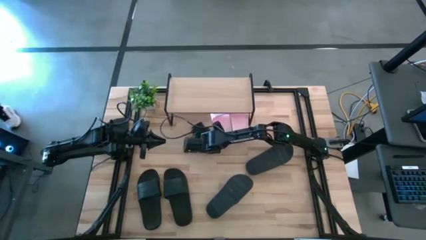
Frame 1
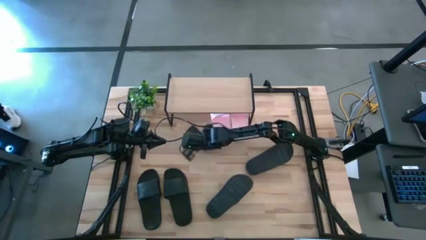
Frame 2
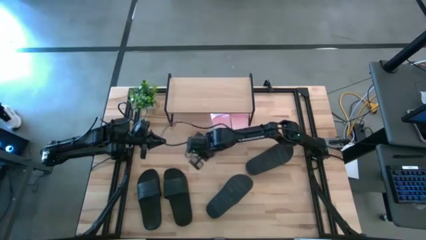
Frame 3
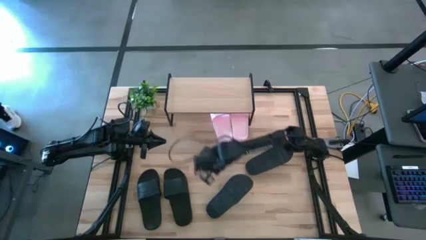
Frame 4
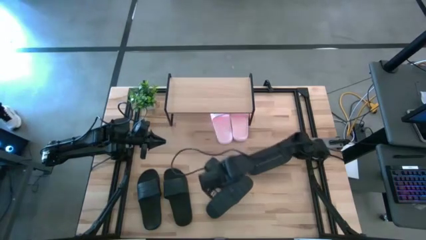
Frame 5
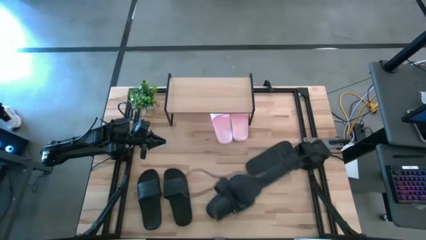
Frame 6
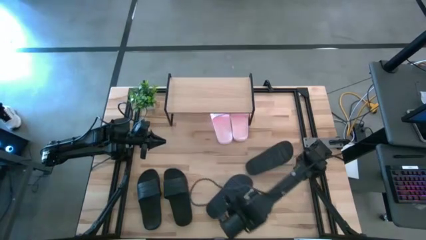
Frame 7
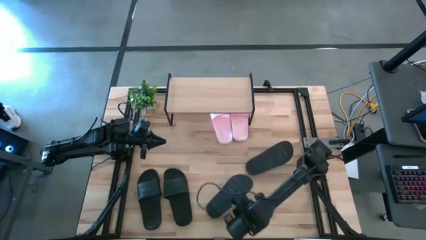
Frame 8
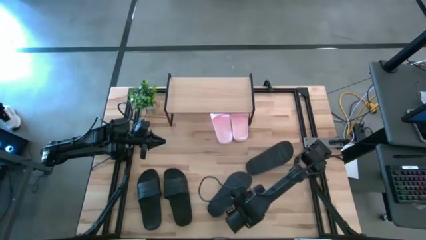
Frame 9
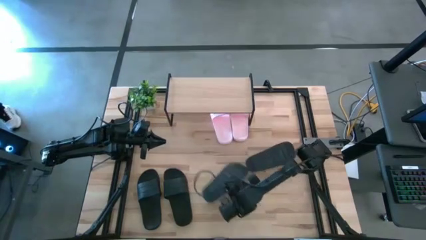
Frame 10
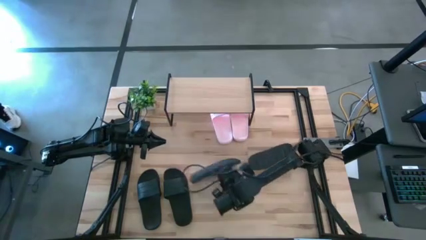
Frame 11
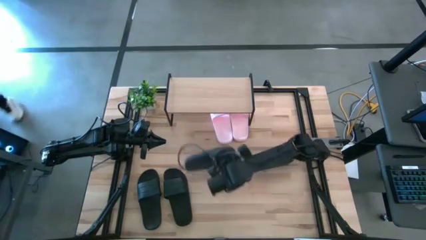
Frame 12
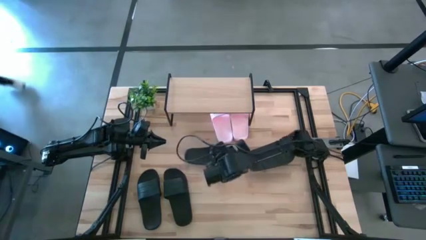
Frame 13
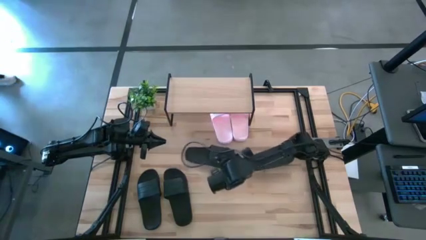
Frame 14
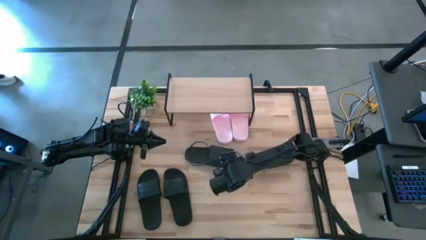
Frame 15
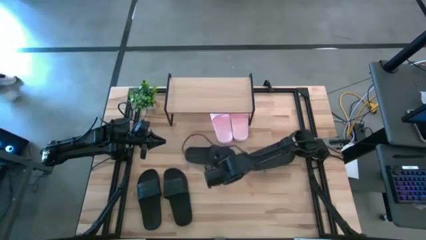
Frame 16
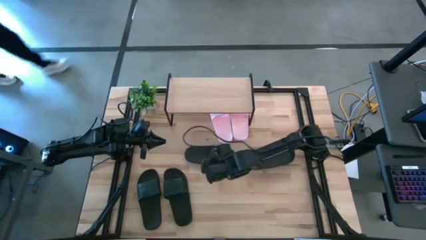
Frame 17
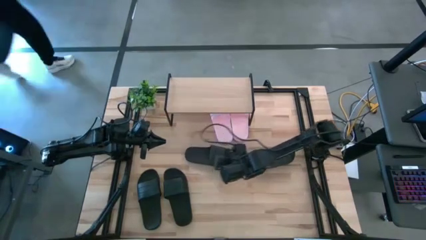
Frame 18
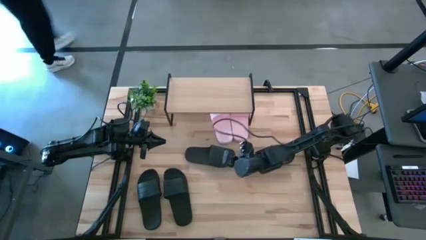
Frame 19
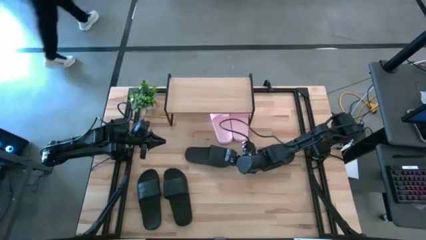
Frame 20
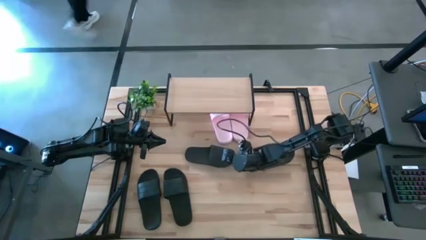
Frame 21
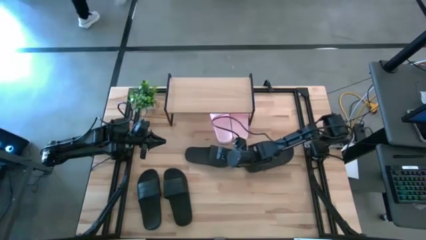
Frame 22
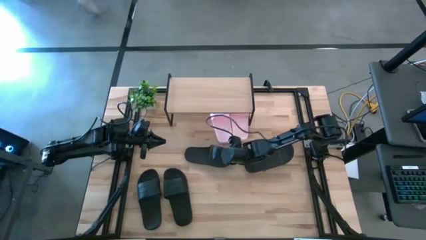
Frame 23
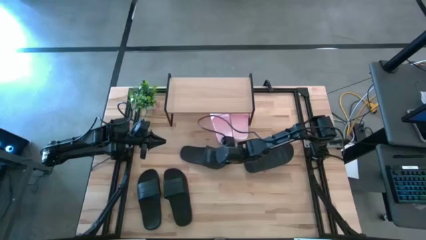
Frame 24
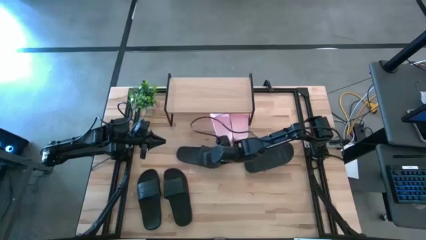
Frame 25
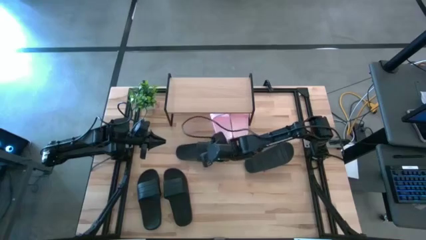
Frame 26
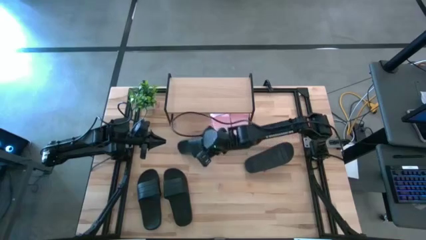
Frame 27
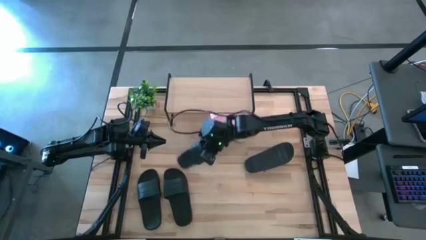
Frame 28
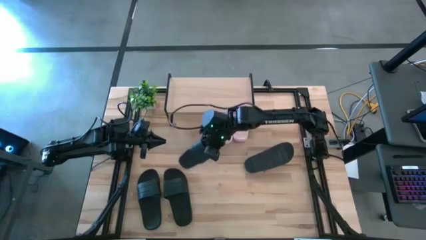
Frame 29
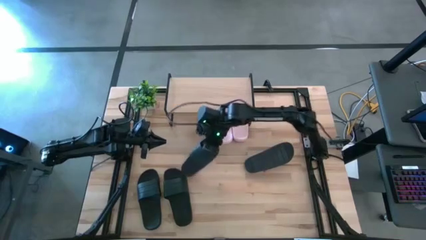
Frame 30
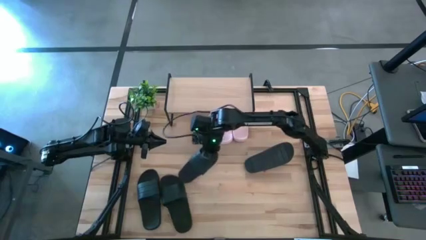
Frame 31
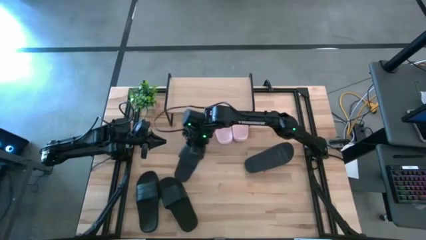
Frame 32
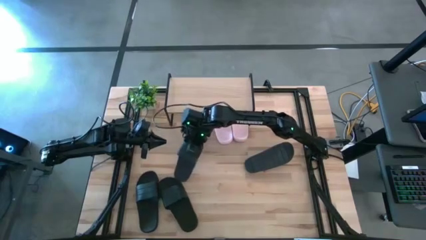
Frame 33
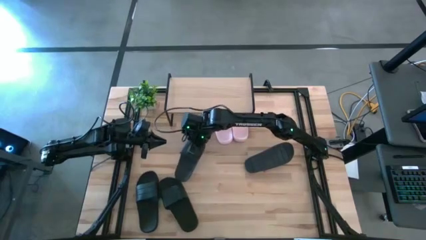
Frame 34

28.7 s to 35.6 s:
Task: Pick and place slides into the shelf
Move the black slipper to the middle left of the table

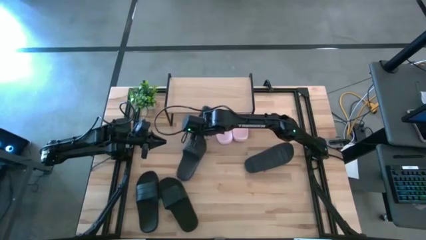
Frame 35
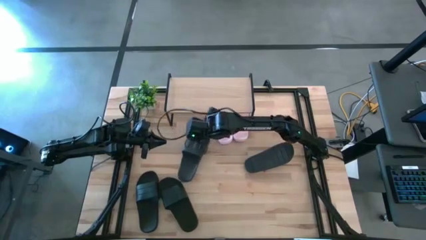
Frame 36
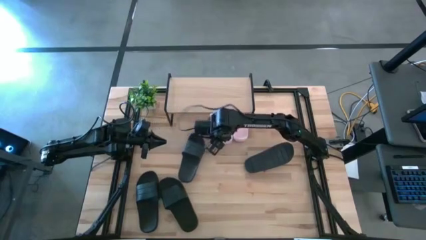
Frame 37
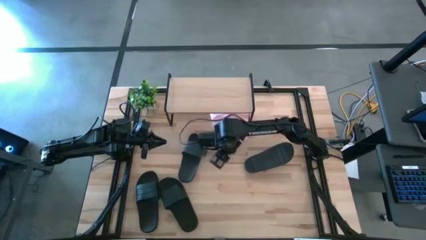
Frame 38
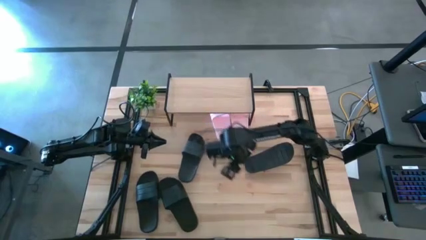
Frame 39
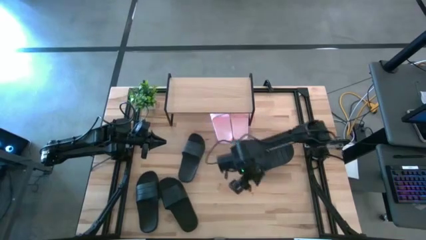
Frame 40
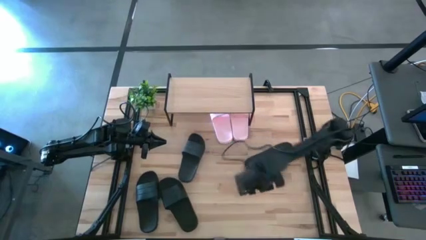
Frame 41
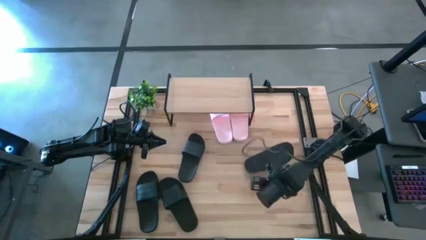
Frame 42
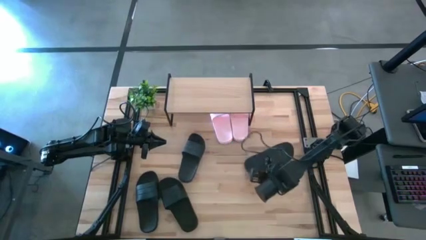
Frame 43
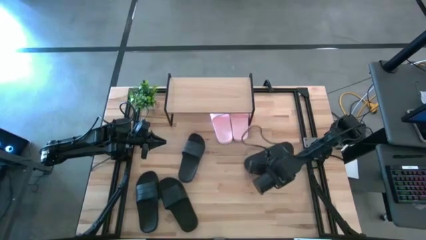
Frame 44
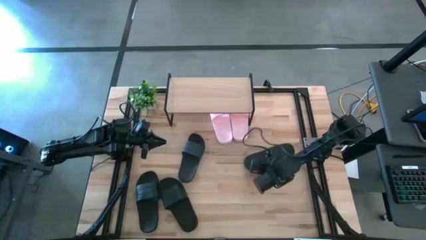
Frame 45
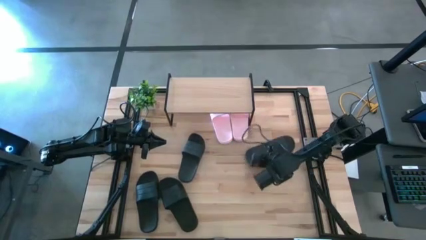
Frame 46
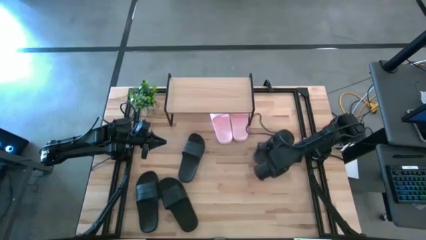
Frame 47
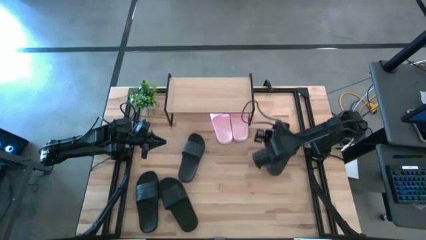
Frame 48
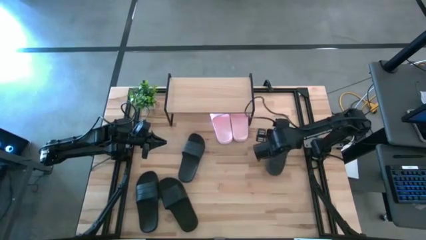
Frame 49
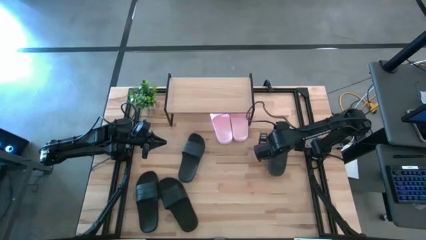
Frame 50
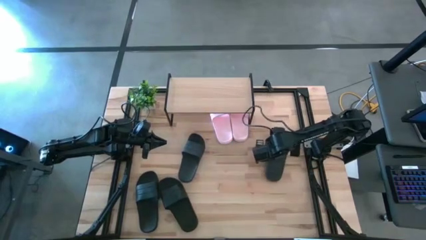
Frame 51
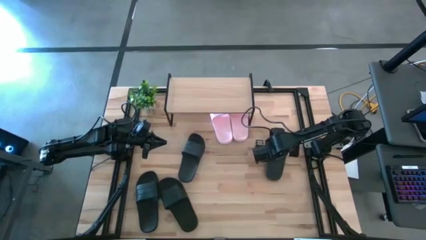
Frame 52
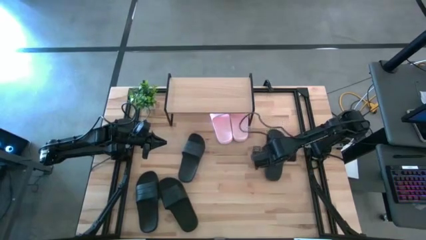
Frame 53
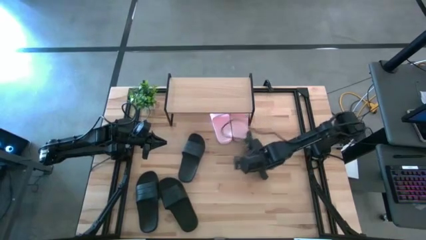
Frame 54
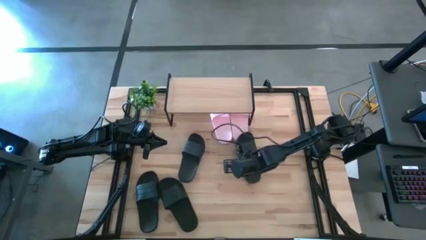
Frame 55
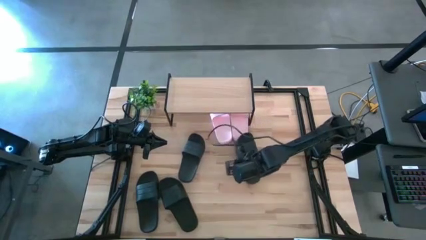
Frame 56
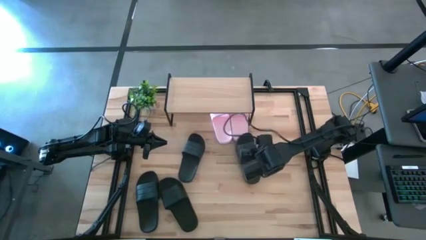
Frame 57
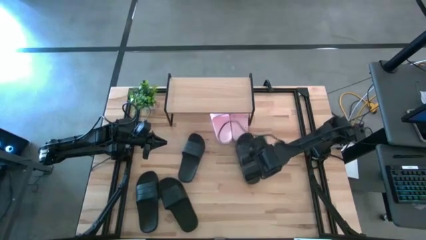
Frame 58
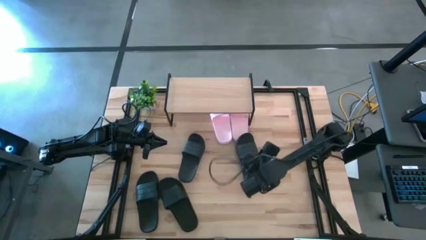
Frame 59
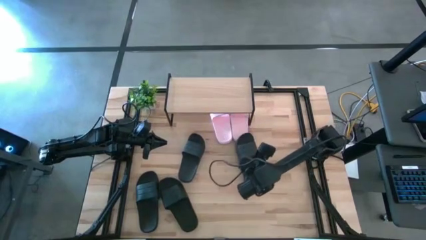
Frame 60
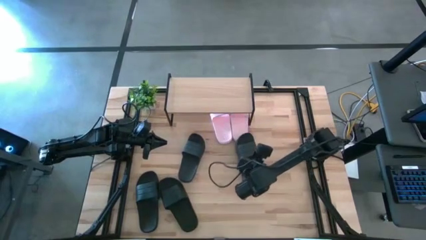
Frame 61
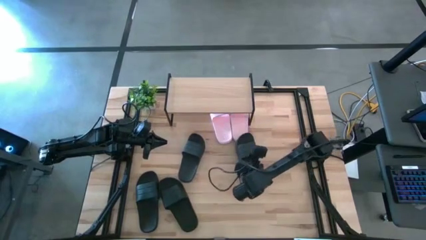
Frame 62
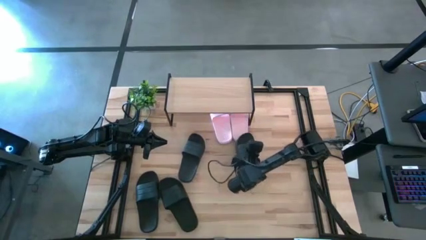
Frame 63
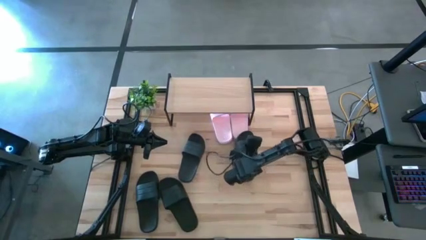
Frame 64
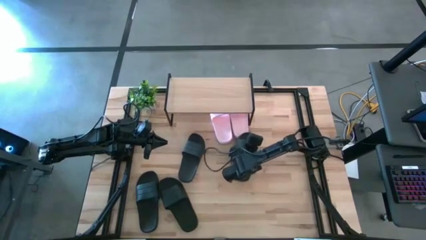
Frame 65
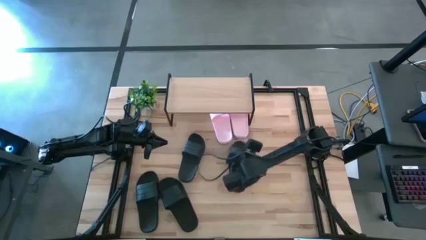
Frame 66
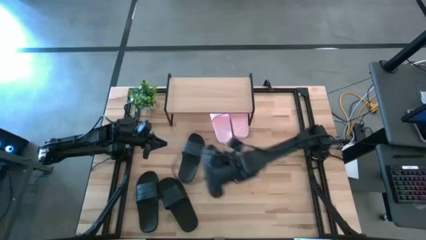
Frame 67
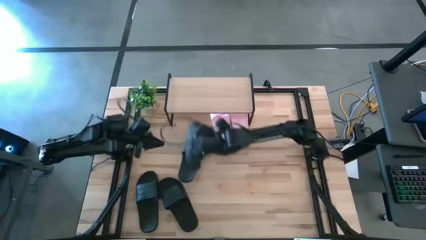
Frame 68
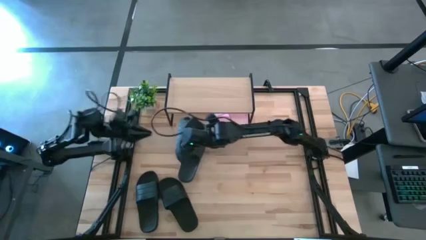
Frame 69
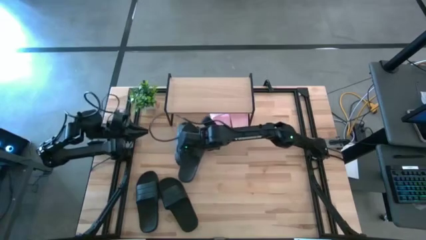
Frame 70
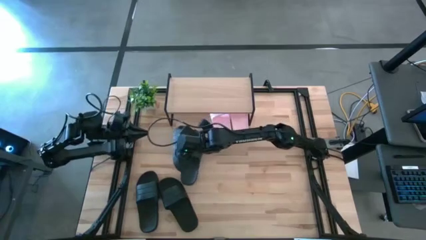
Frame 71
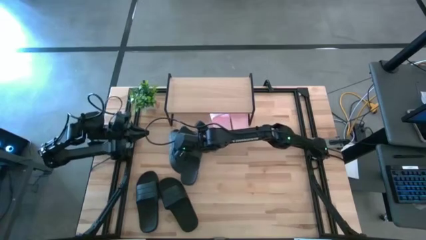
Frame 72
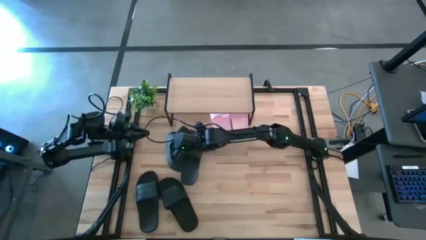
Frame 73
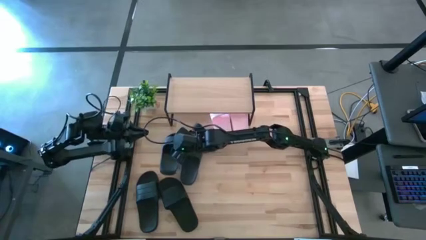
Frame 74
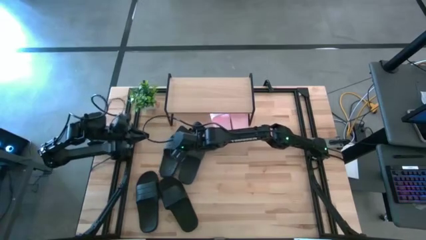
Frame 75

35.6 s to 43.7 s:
Move the black slipper to the middle left of the table

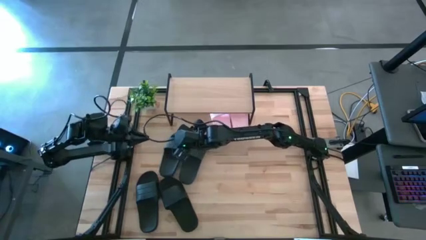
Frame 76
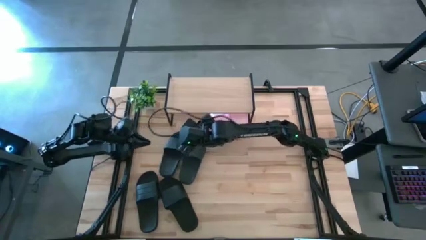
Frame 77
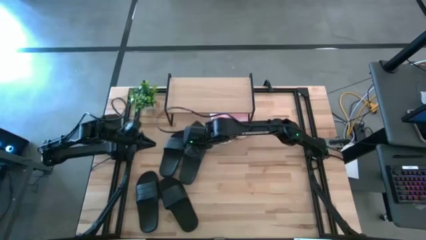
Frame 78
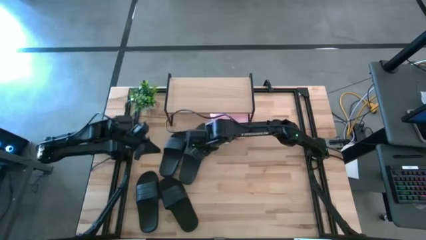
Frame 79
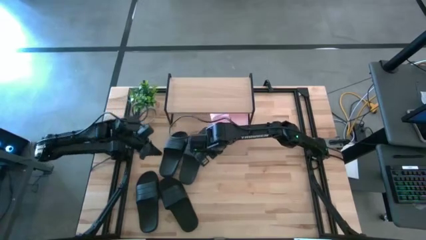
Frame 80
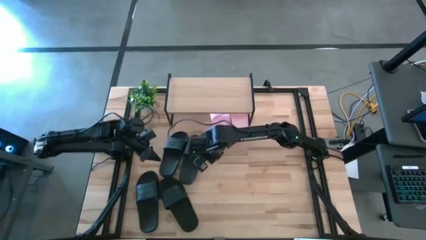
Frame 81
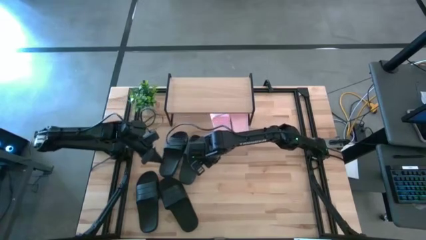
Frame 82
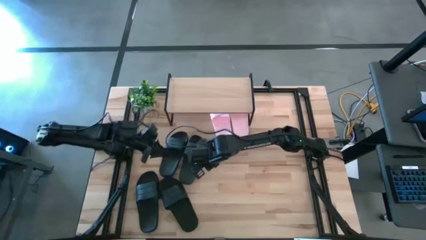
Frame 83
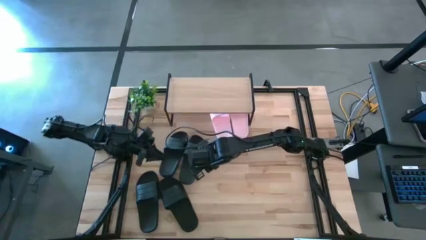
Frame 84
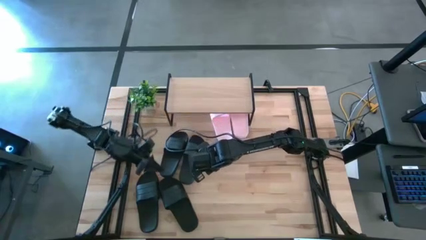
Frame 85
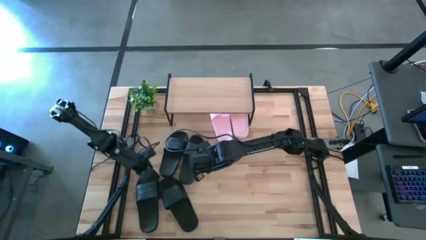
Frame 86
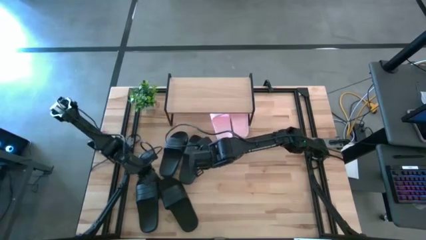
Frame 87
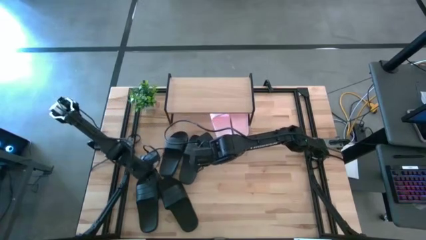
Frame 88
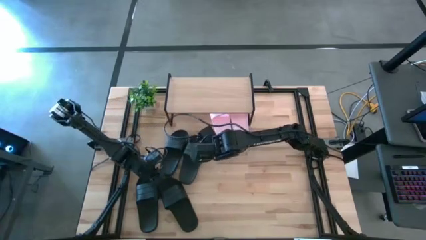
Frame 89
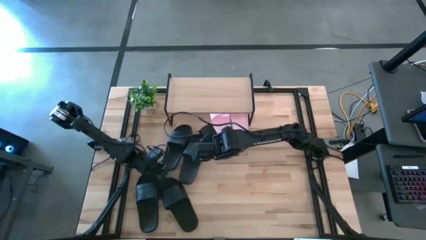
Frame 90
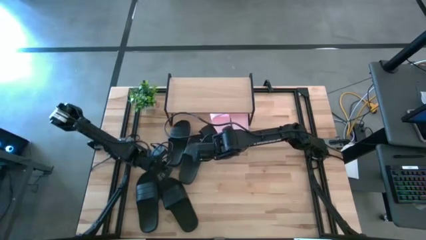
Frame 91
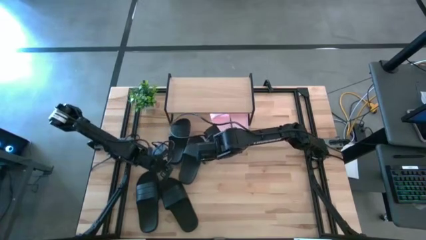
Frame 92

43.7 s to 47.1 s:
Adjust the left black slipper under the shelf
